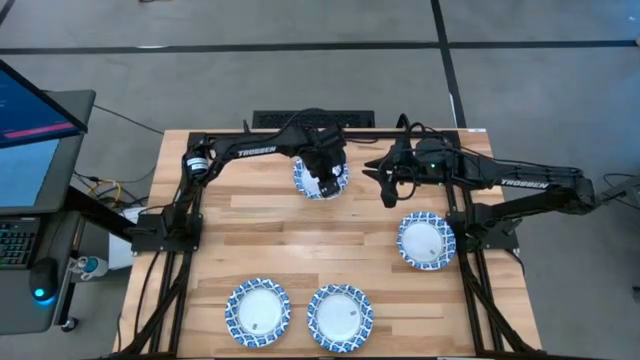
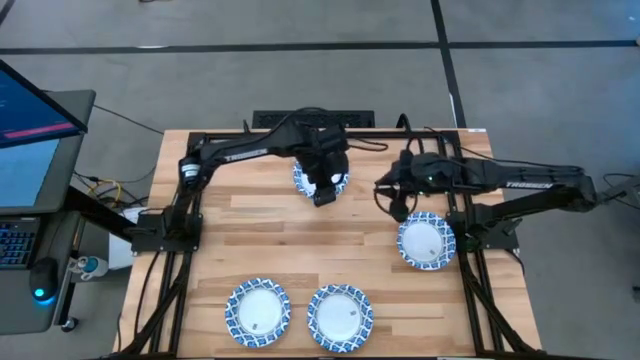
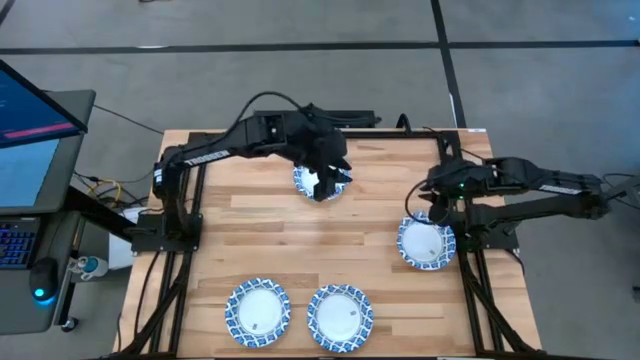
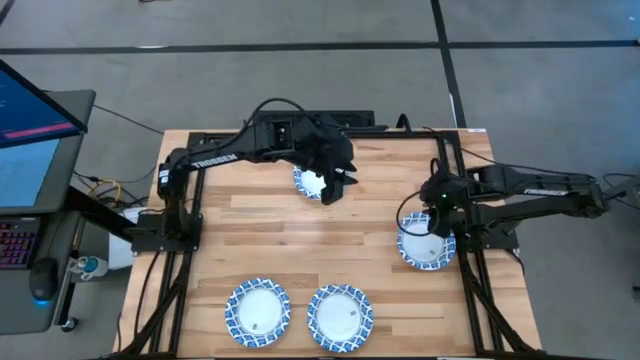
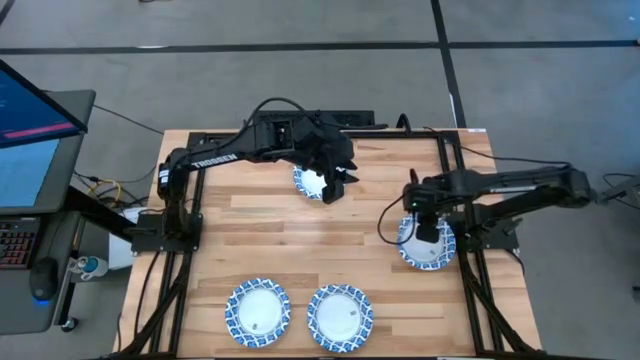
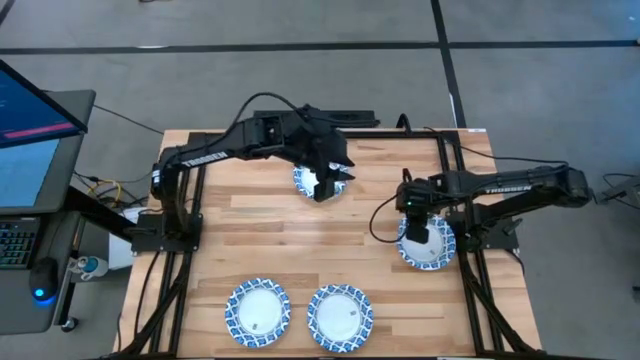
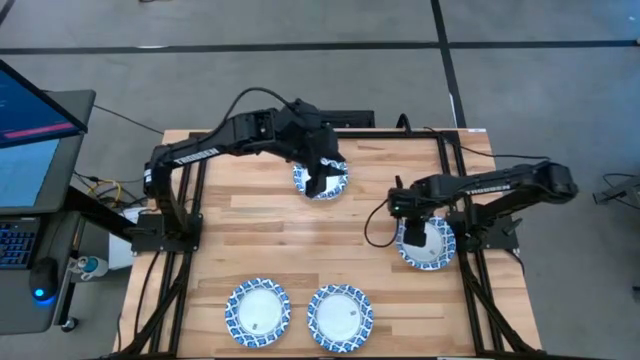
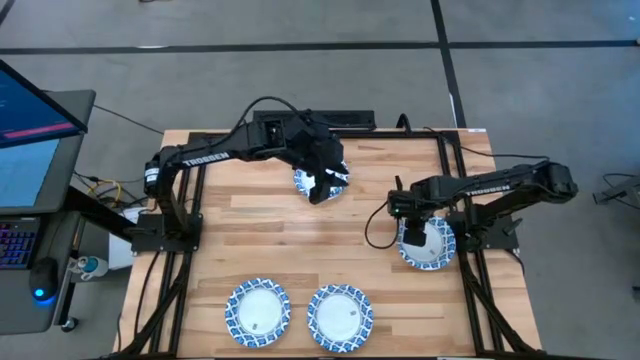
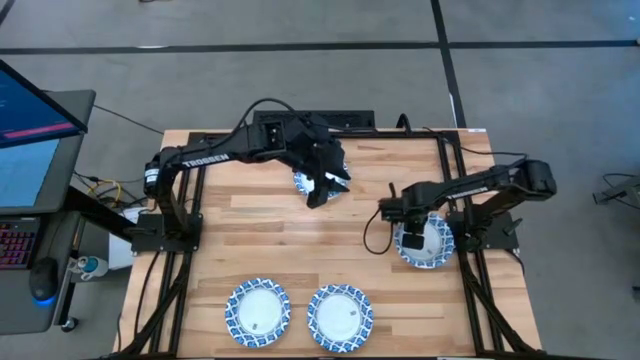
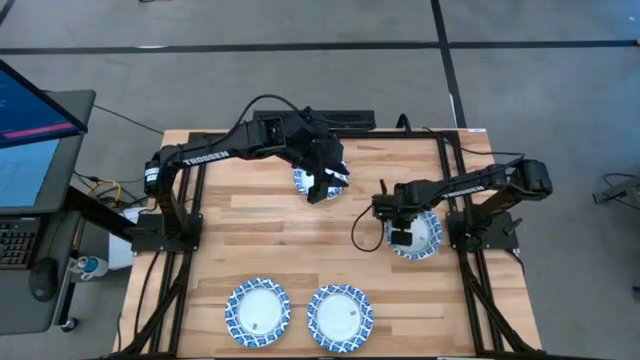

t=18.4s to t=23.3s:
Task: Nest bowls inside each other
Stack the white bowl on top of the other white bowl

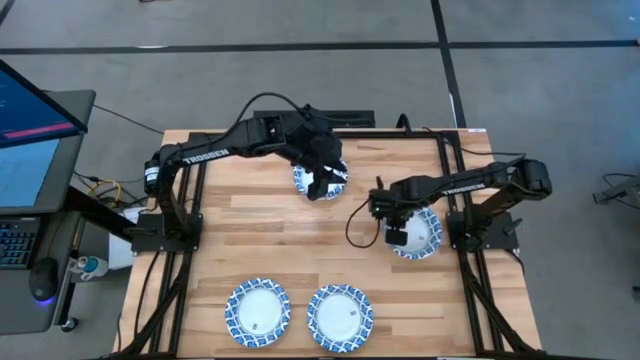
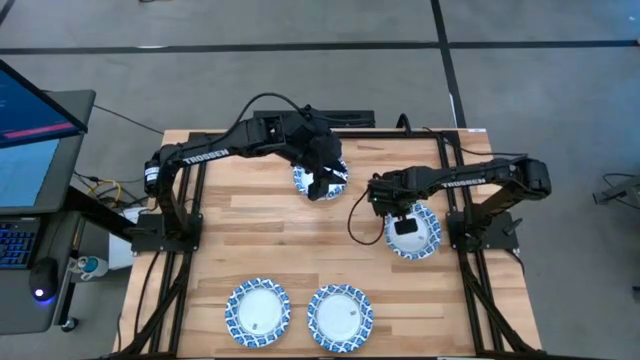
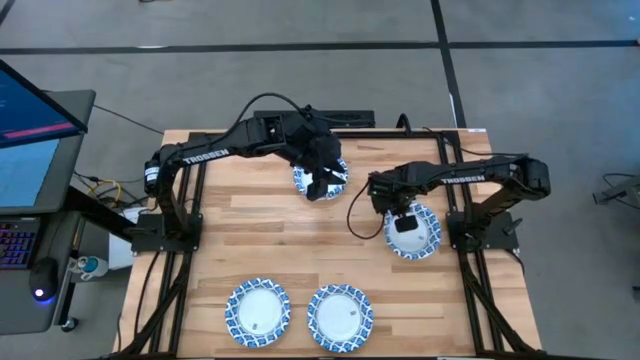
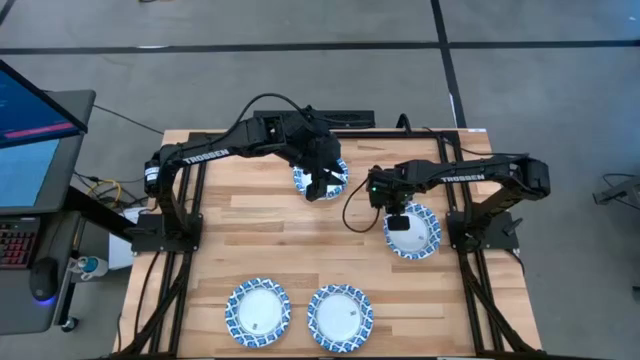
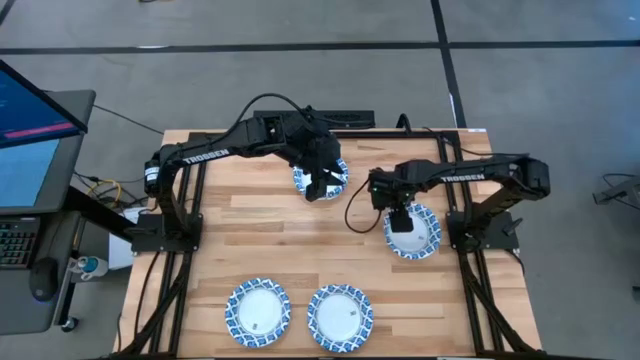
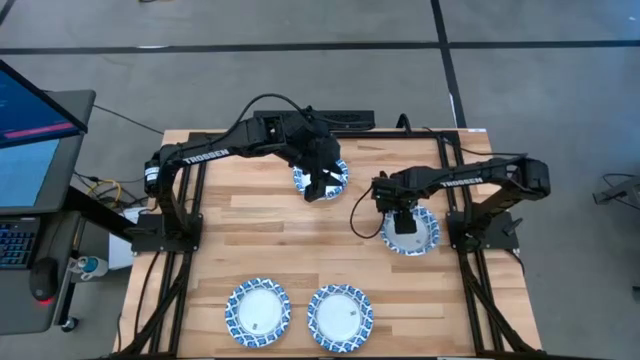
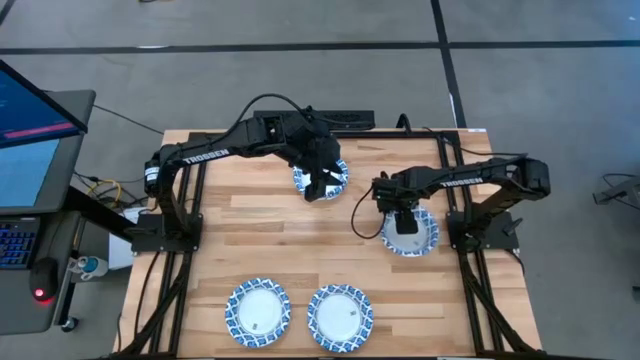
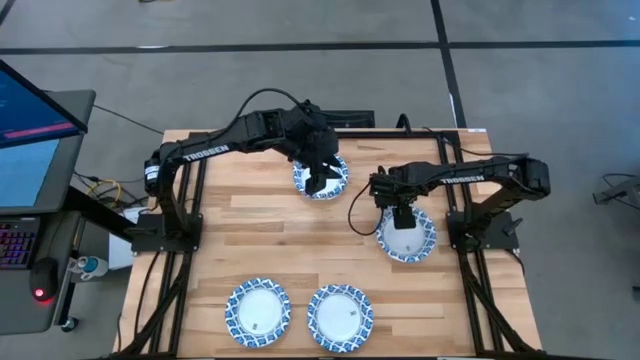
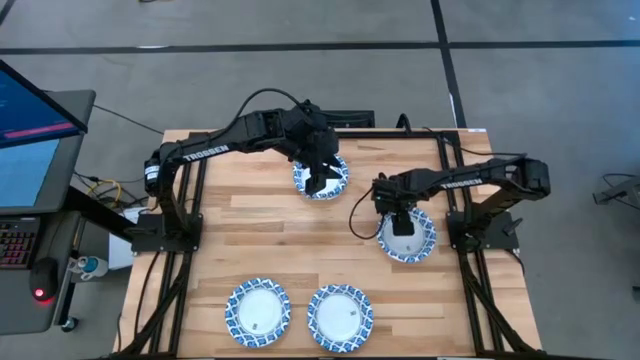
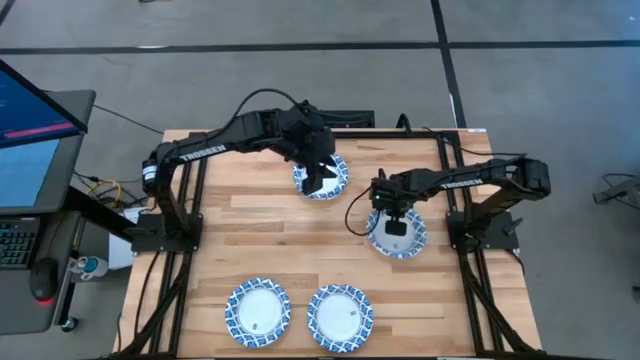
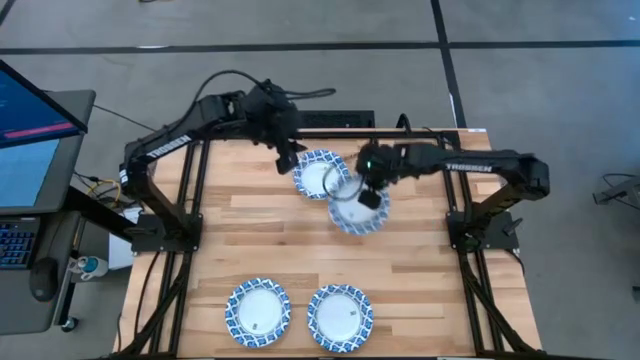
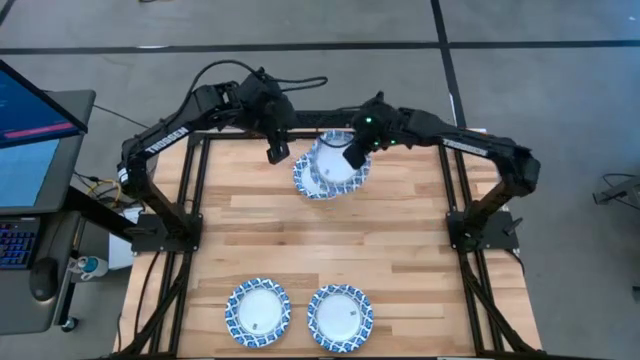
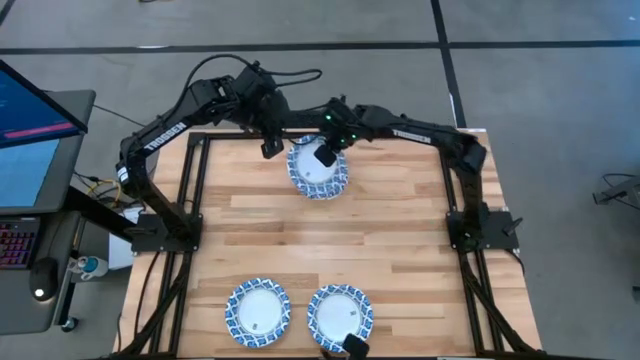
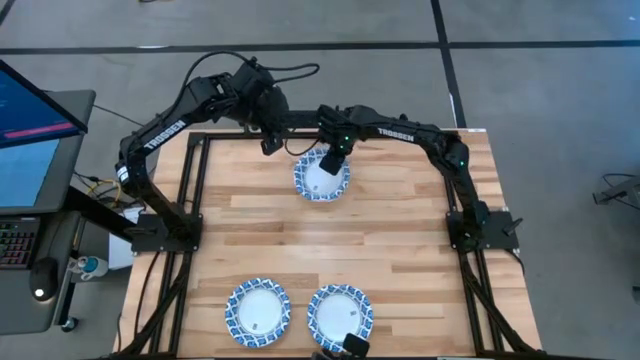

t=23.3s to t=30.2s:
Stack the white bowl on top of the other white bowl

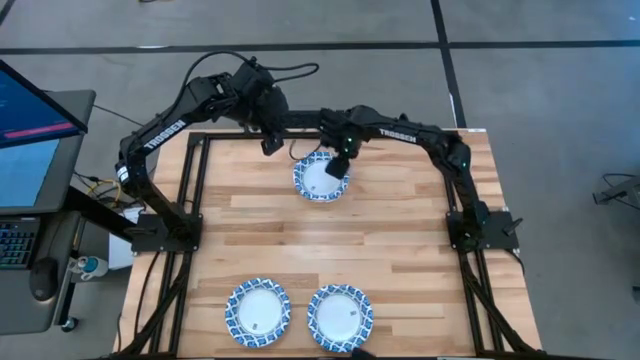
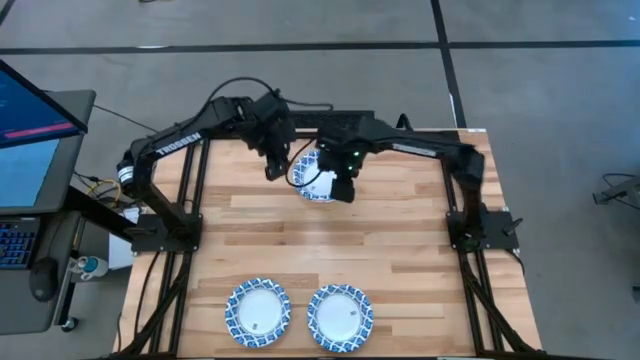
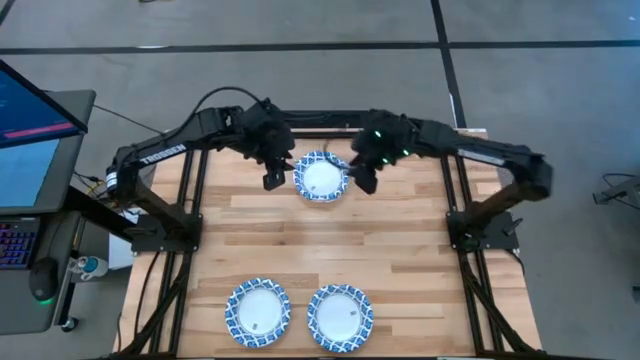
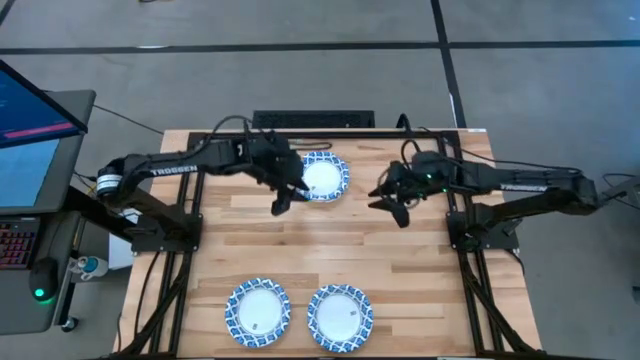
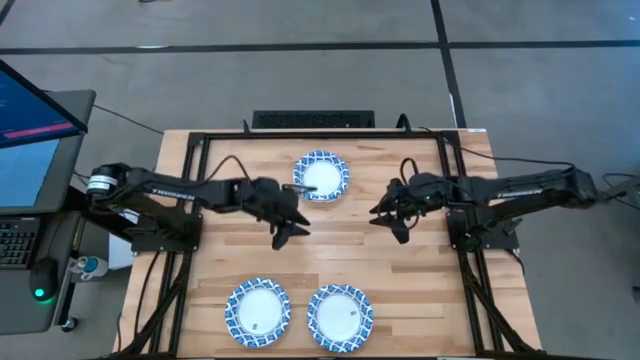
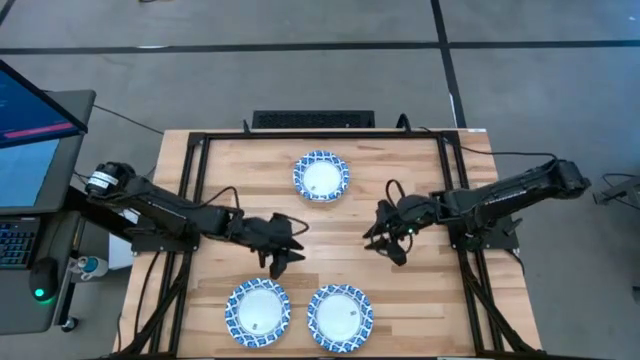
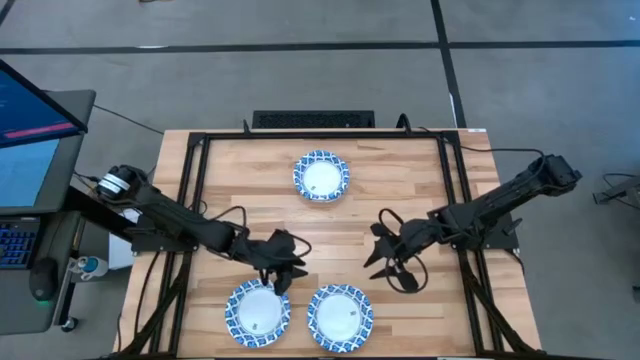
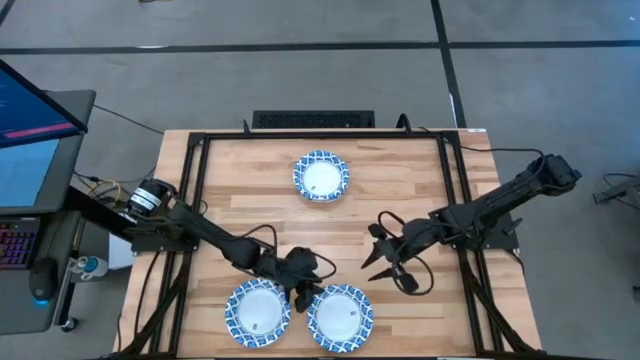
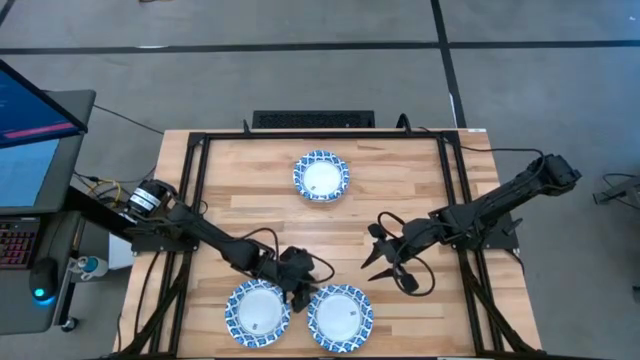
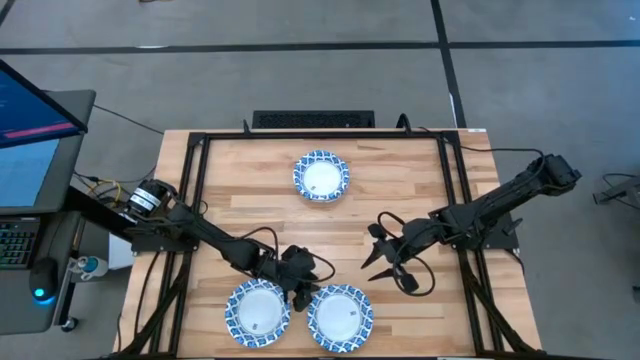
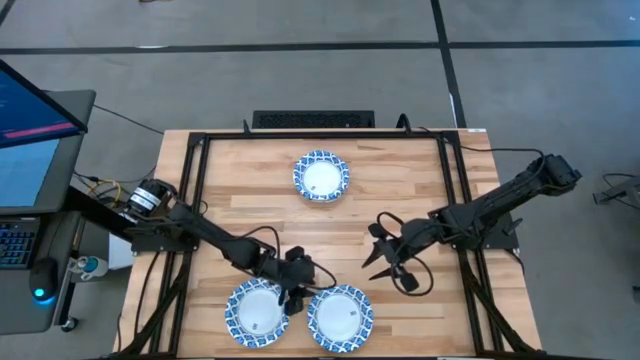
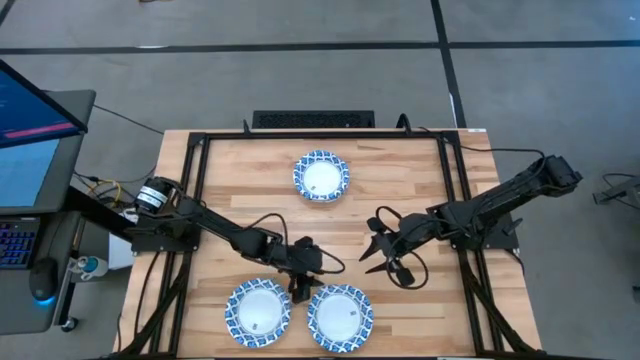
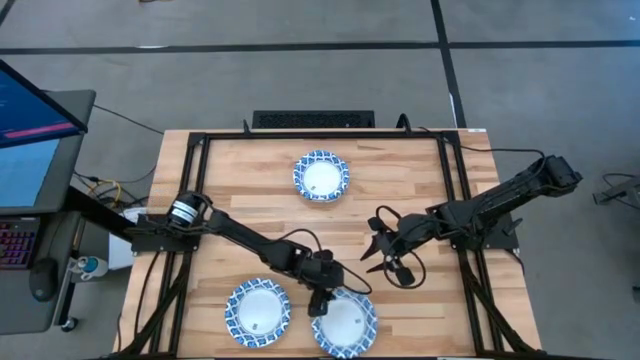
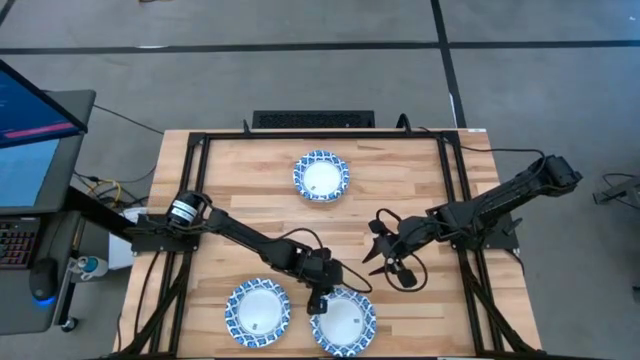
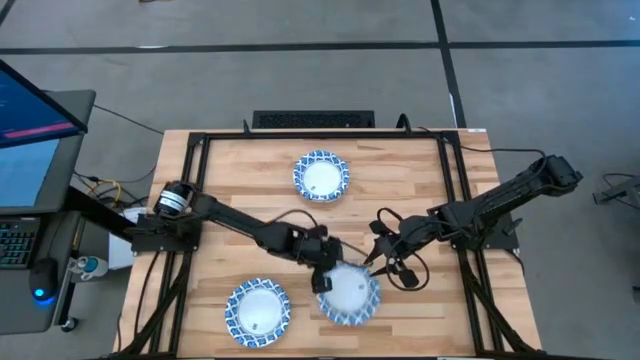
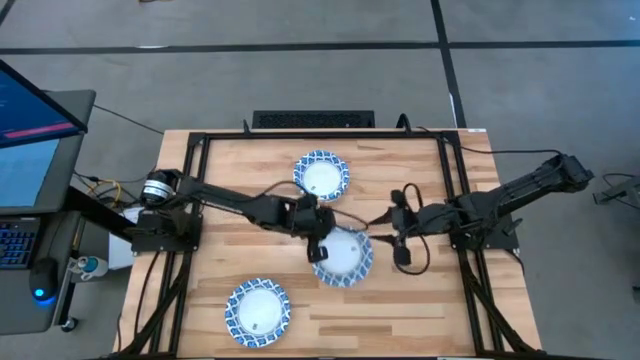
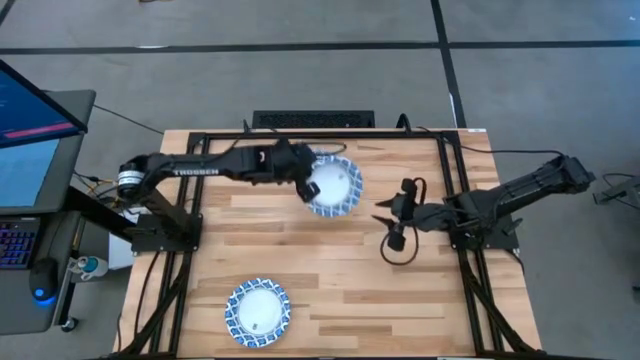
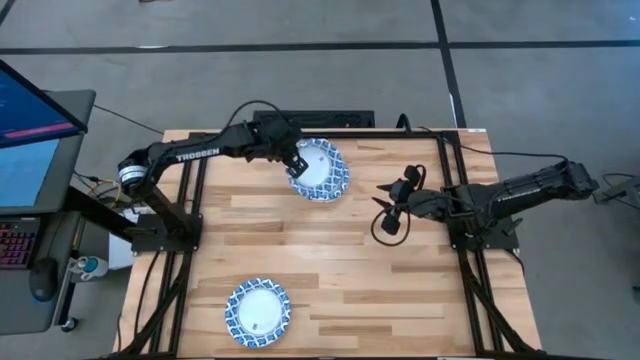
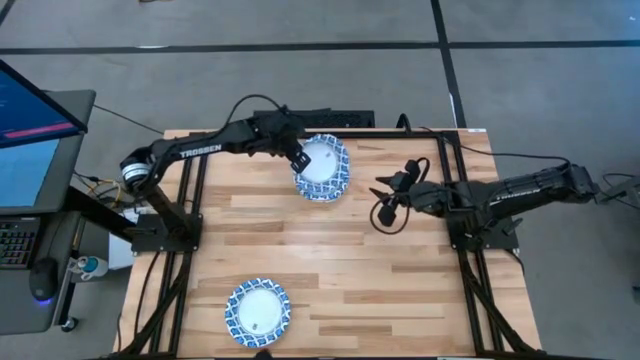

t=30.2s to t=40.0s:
Stack the white bowl on top of the other white bowl

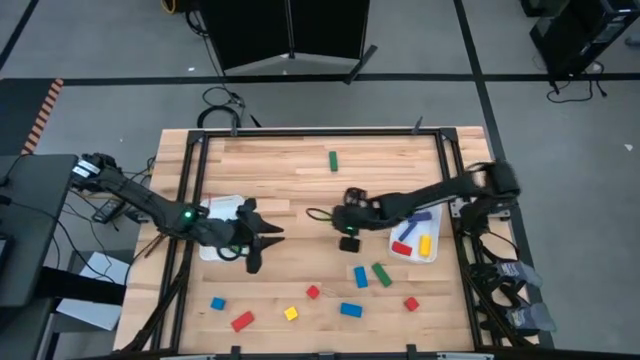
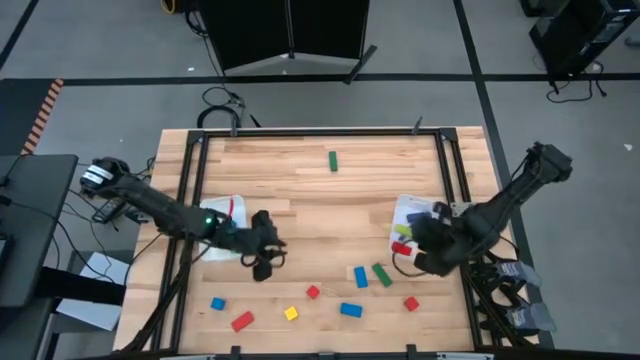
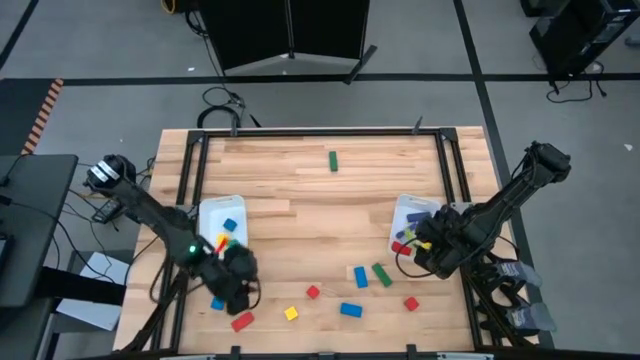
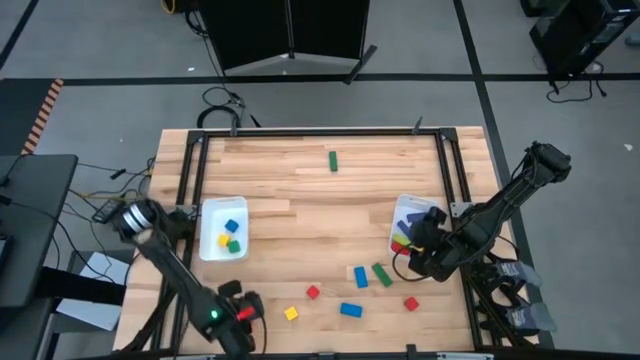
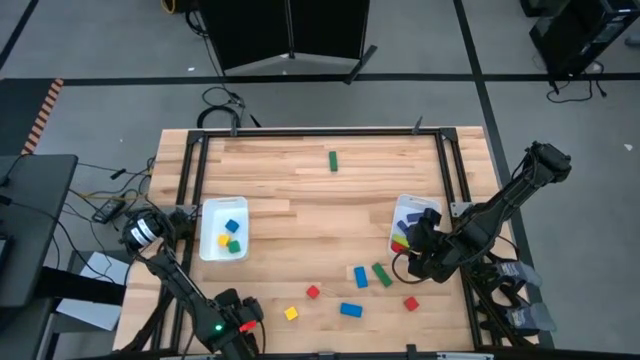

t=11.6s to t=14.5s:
Task: Sort blocks by size
Put the light green game piece into the right bin
